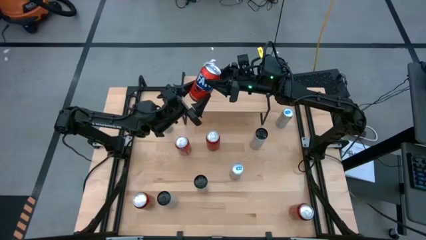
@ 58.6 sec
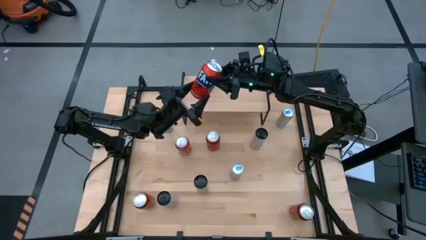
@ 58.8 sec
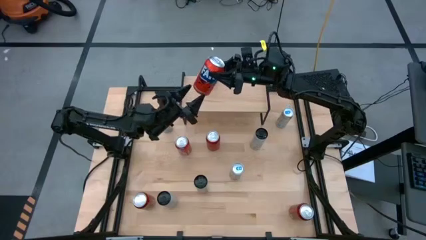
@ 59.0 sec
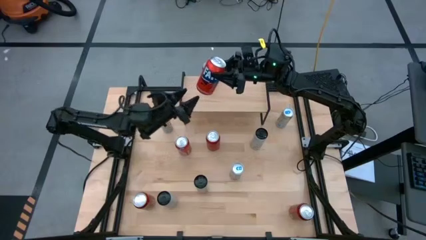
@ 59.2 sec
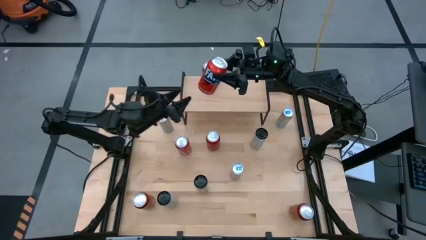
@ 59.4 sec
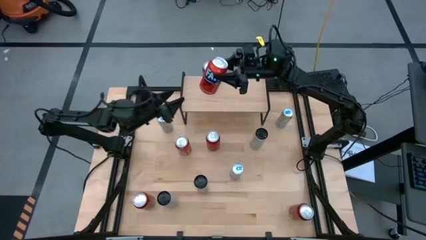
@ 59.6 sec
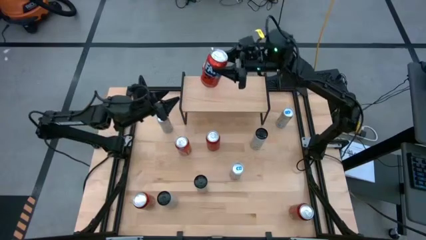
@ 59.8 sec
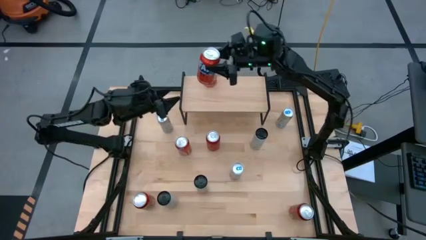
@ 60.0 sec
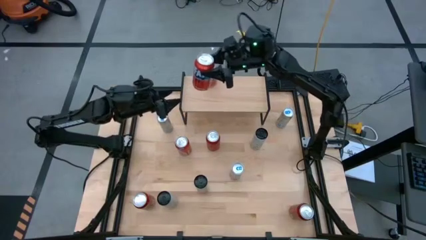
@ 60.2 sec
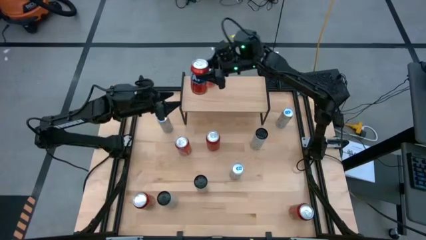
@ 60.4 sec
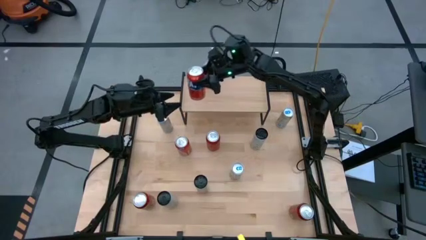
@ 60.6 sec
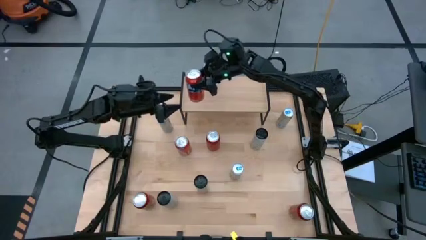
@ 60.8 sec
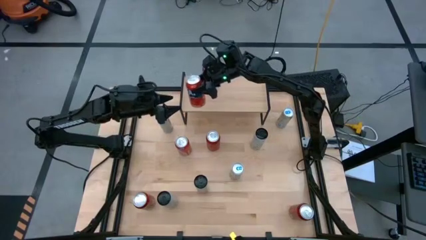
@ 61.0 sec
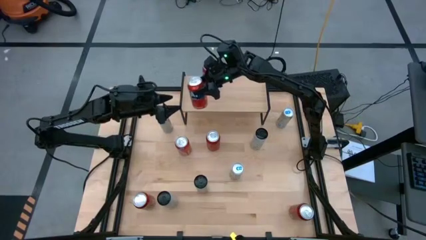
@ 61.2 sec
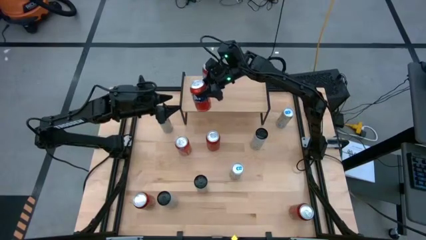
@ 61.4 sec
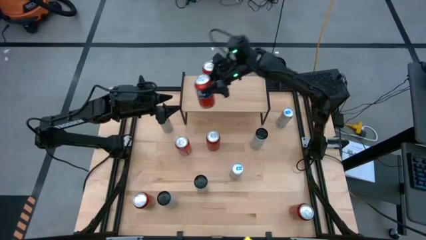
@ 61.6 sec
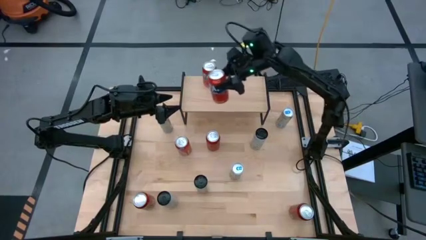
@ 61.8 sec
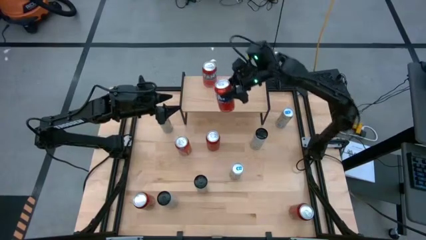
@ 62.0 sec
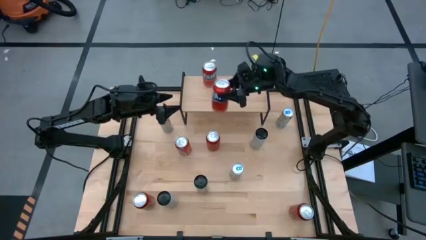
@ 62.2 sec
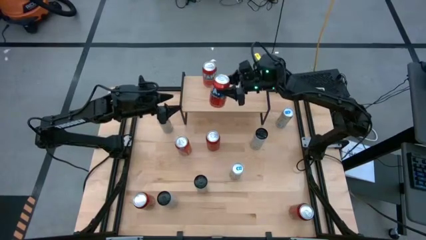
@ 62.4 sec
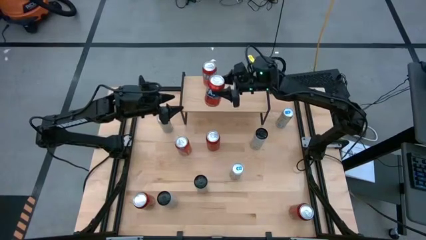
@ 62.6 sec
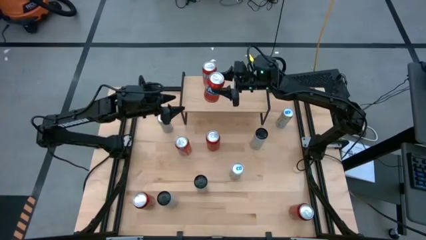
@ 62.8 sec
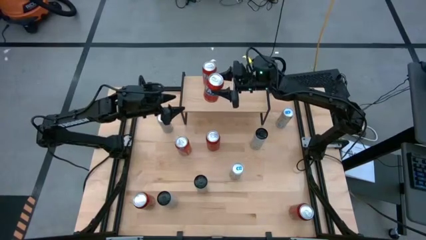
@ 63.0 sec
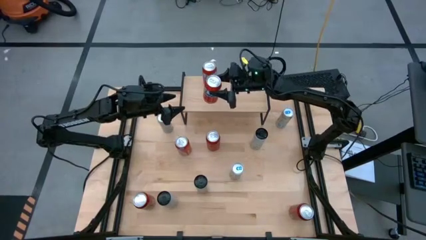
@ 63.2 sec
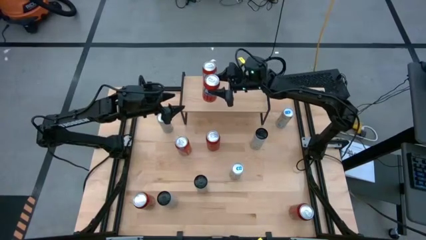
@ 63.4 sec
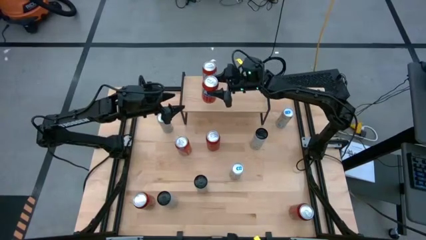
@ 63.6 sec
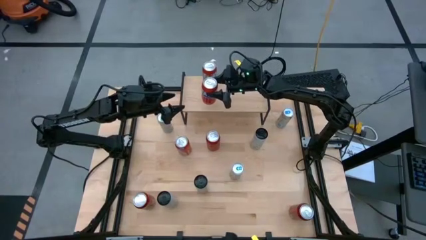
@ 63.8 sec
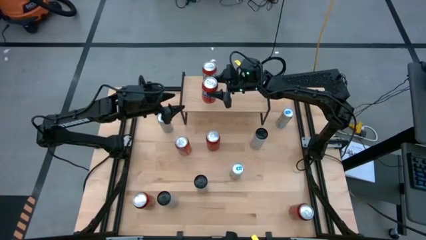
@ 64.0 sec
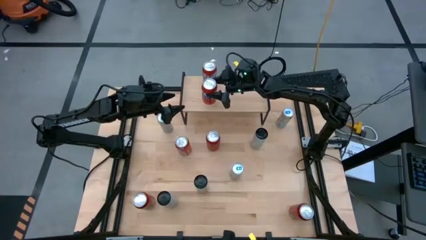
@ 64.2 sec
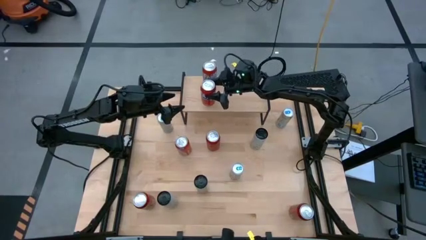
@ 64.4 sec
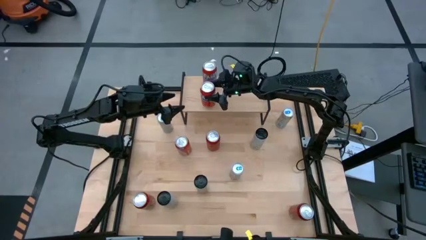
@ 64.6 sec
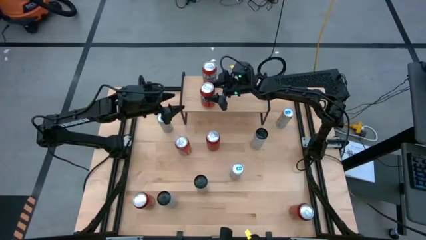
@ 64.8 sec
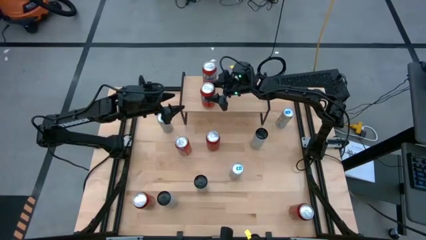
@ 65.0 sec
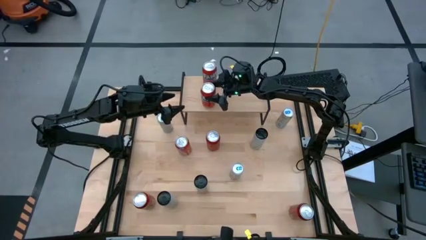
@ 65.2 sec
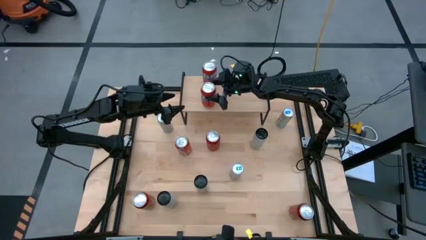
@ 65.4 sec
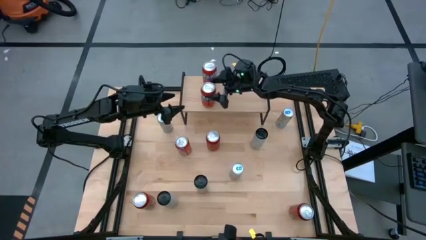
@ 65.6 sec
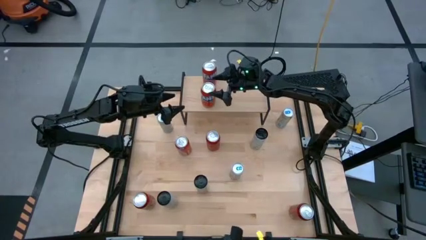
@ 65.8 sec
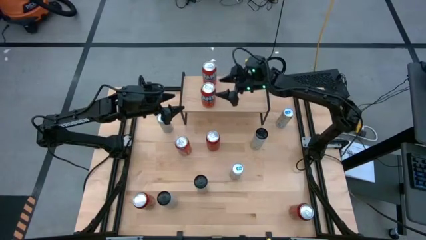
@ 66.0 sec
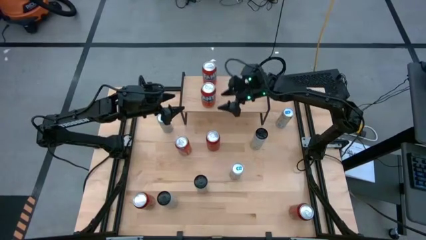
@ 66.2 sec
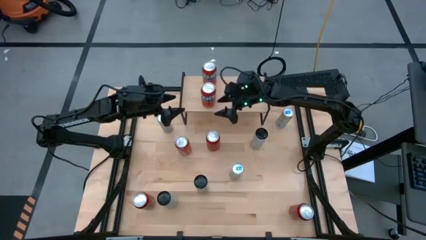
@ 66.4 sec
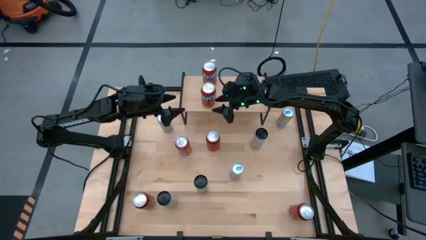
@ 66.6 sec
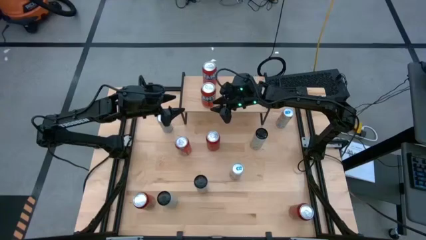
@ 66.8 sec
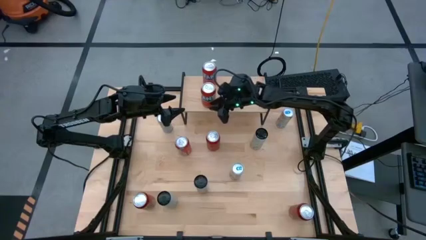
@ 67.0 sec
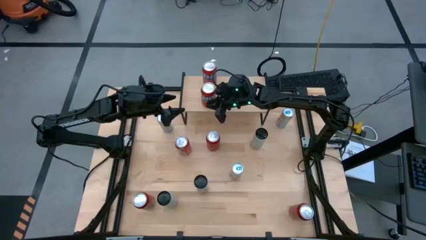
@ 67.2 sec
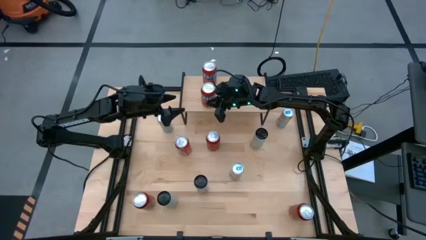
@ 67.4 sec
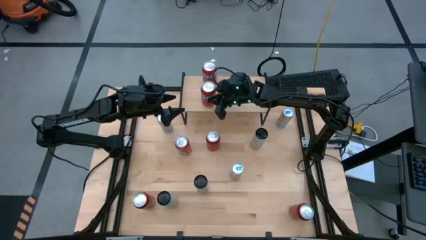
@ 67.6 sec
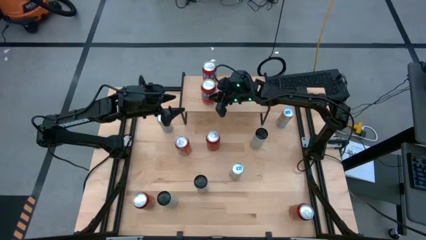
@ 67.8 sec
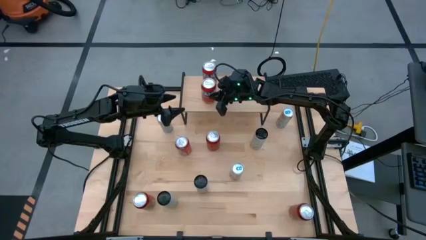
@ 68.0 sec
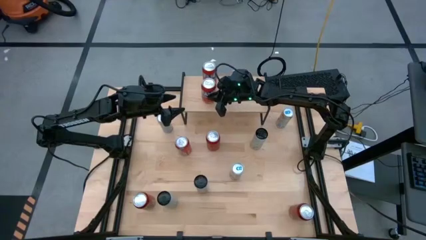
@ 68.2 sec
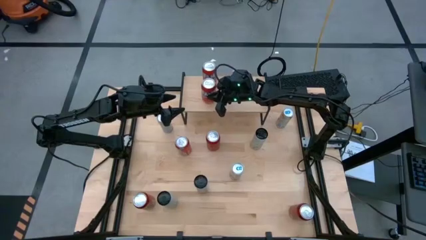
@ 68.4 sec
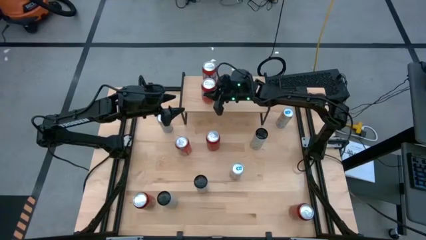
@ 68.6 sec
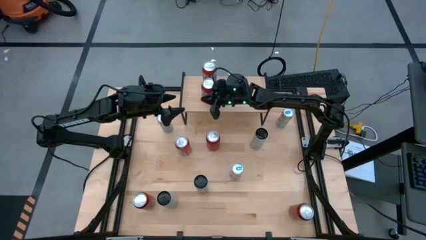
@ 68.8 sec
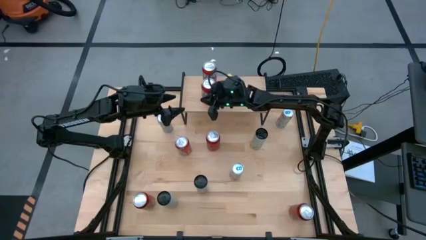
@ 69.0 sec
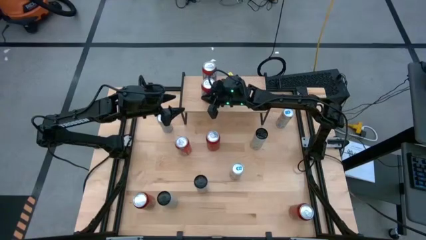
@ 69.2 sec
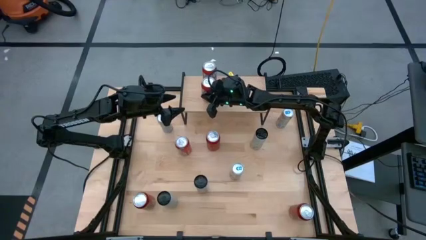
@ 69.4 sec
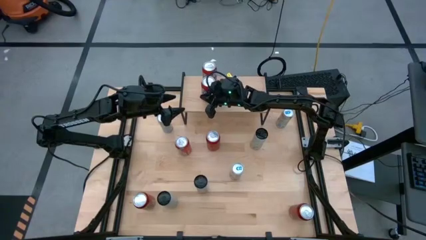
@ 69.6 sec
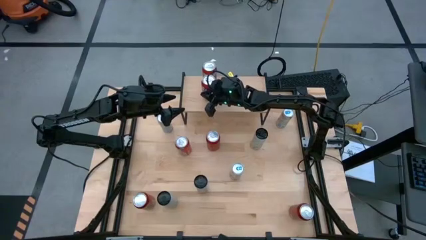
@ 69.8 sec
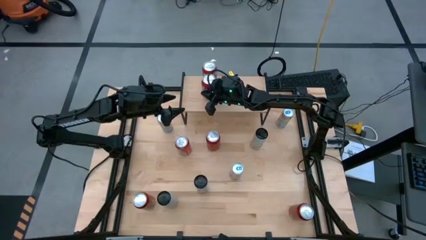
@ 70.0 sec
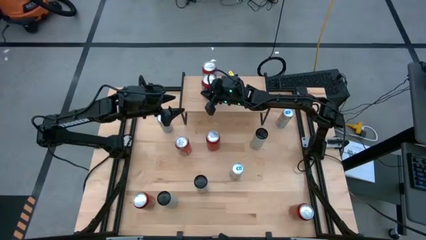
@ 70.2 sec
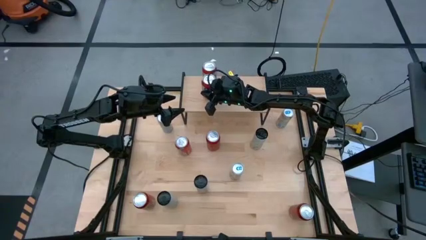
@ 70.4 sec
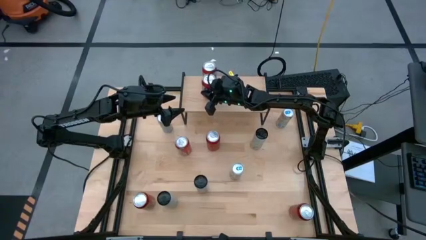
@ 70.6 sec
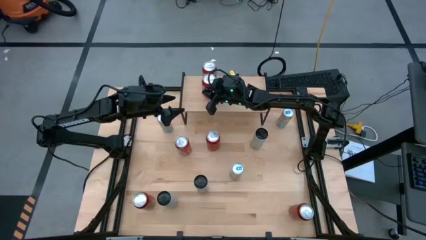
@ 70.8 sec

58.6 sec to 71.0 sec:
Task: Place canned beverage on shelf
Put the bottom red soda can on the shelf aligned with the other red soda can

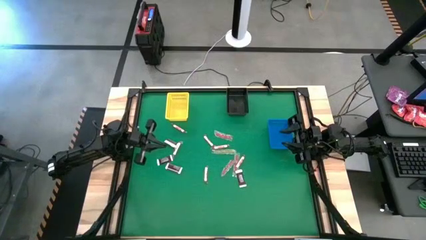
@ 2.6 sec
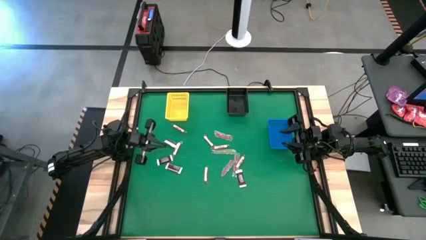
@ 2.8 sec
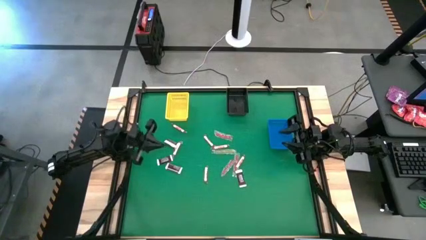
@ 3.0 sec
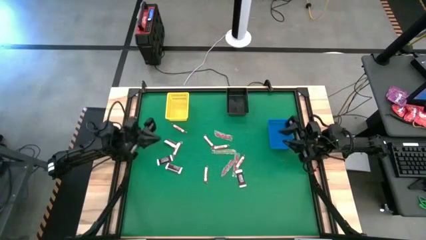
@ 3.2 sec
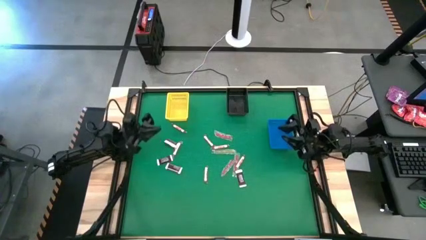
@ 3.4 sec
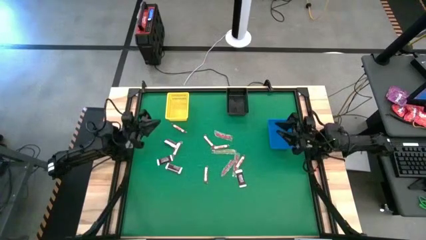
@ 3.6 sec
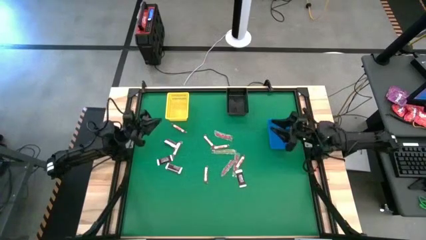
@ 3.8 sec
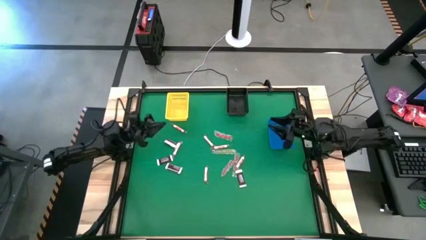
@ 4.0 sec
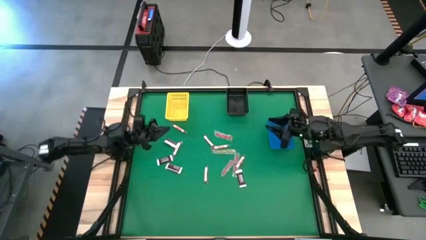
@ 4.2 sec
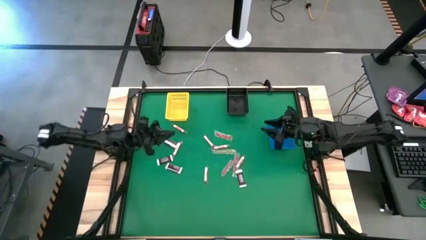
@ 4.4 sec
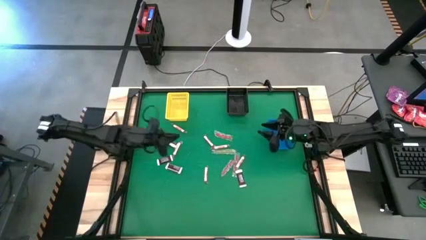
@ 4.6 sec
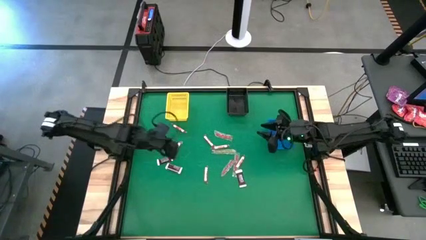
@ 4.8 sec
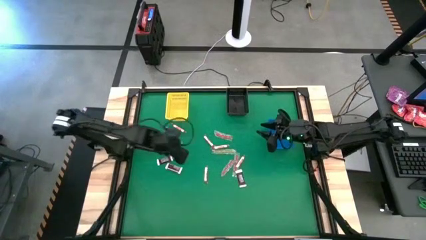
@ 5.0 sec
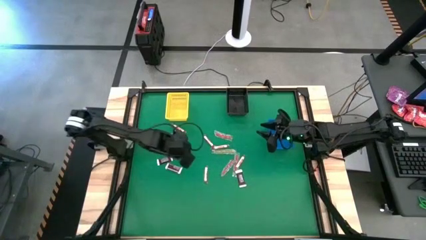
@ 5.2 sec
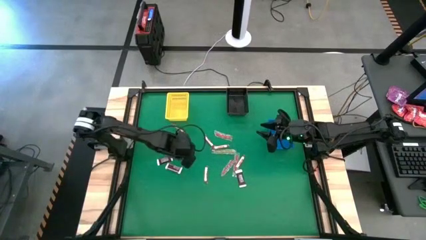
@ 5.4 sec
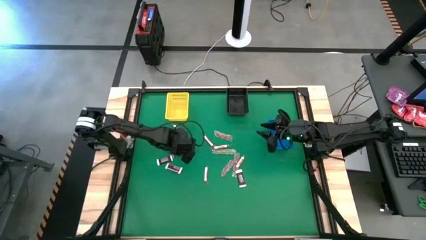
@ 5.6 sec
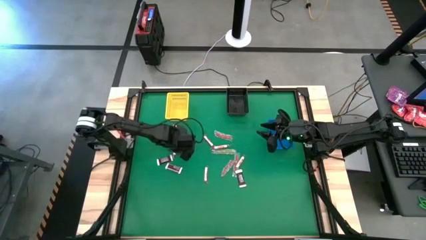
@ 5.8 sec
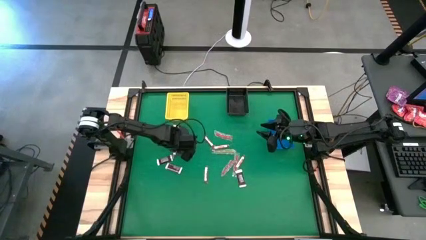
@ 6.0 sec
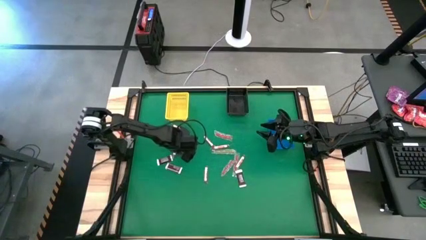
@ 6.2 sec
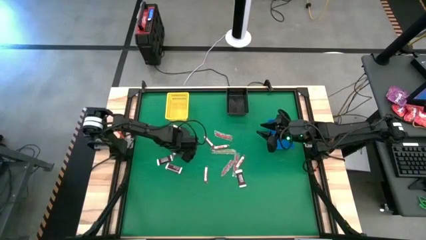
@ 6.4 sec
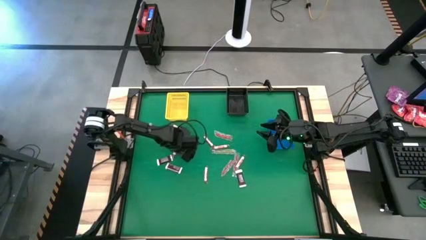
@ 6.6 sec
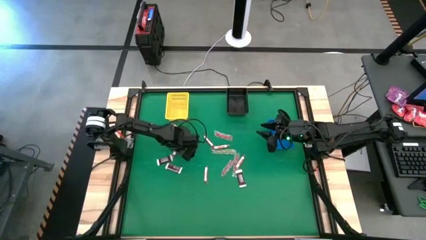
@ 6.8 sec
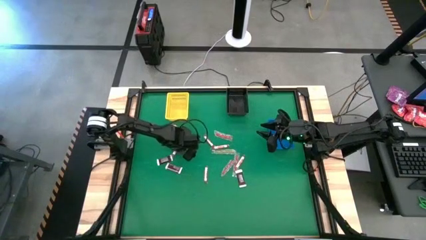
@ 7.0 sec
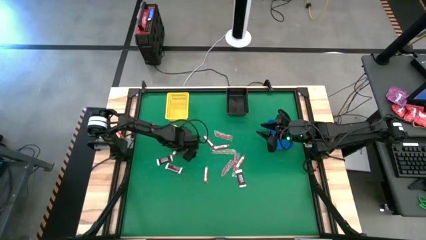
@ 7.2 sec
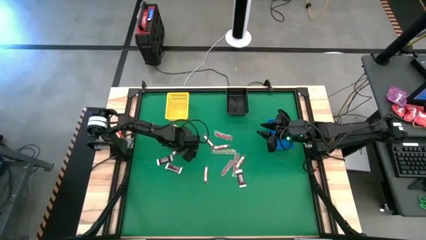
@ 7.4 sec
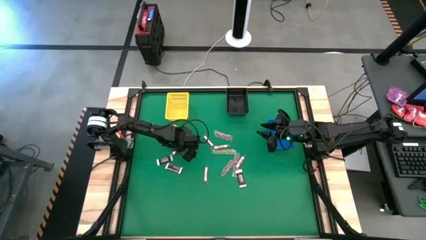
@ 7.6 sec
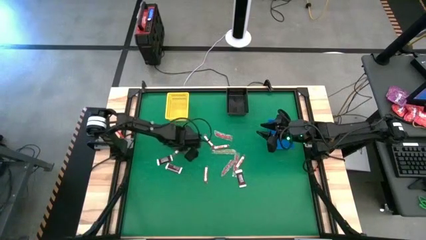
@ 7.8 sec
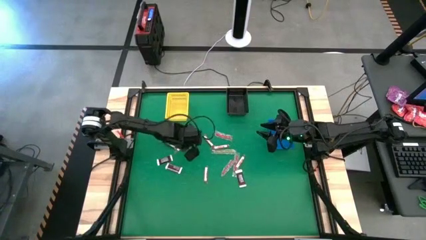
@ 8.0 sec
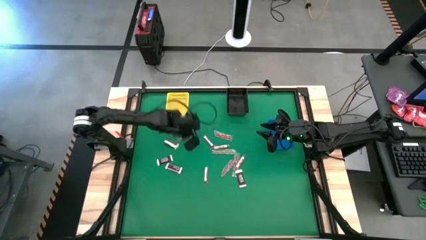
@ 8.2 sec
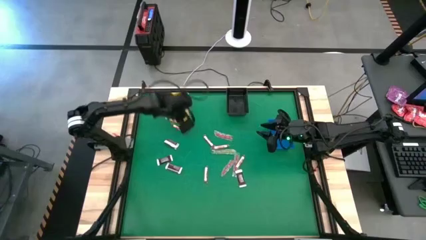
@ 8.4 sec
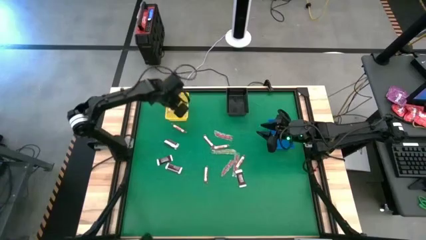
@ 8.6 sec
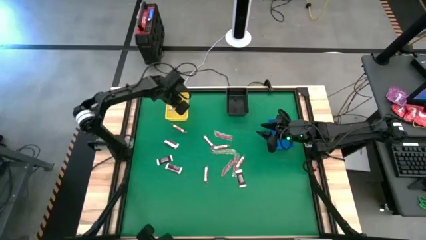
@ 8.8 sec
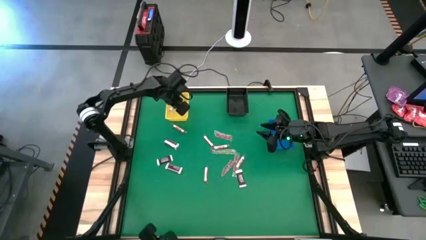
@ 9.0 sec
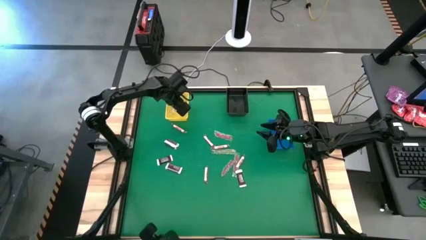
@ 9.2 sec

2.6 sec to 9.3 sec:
Task: Sort candy by brand, put in halloween buckets
Put the pink candy into the yellow basket
